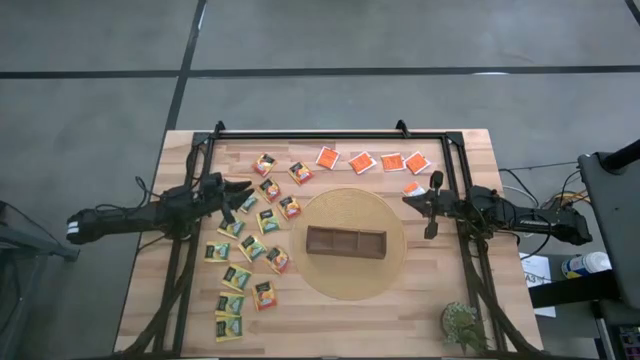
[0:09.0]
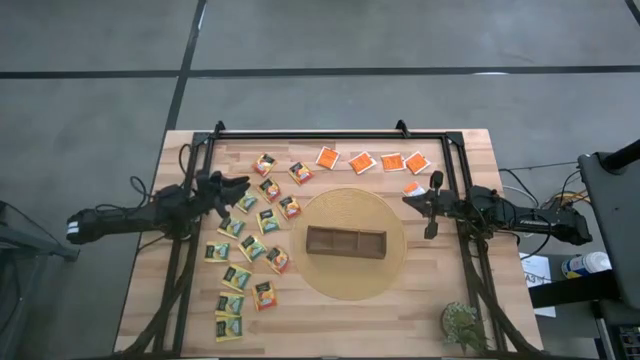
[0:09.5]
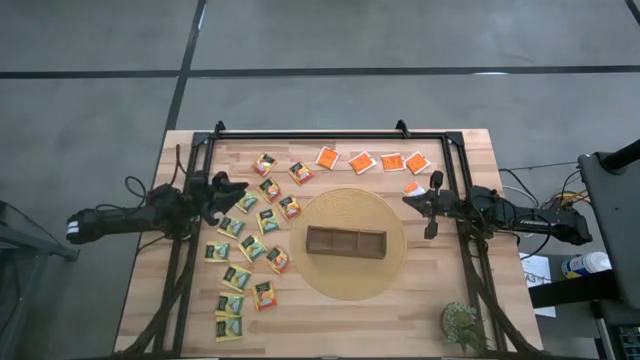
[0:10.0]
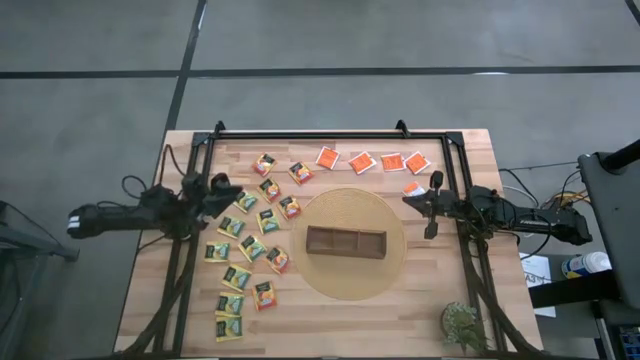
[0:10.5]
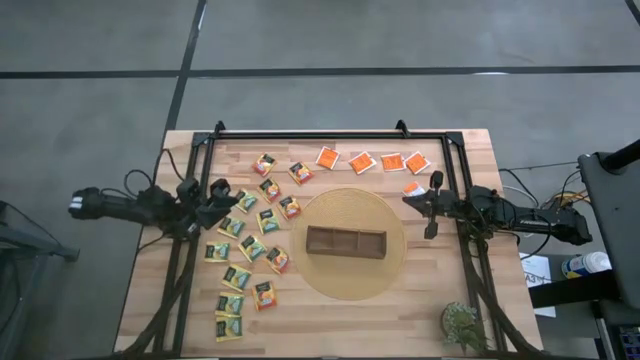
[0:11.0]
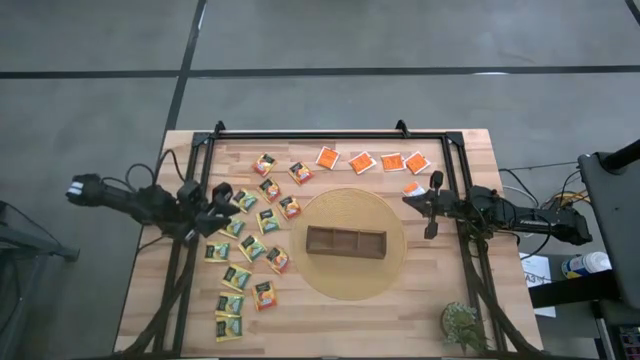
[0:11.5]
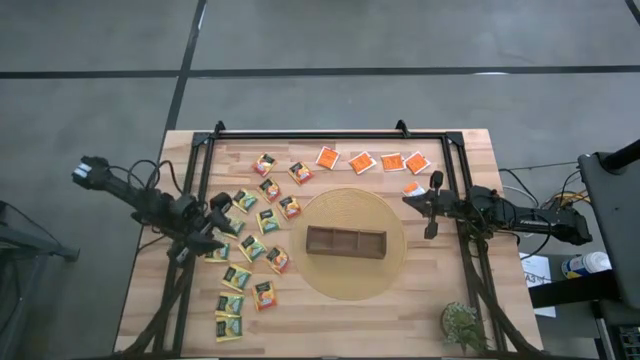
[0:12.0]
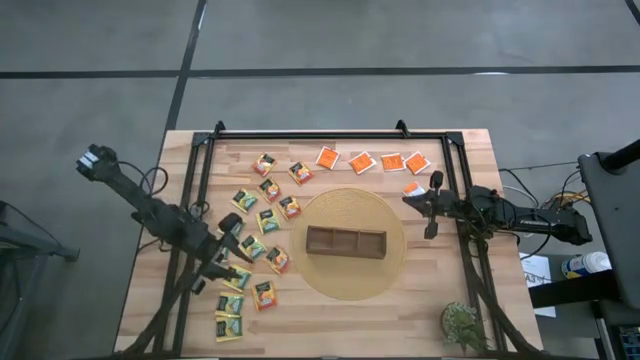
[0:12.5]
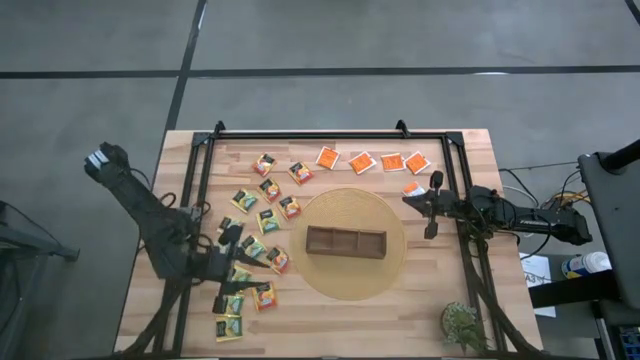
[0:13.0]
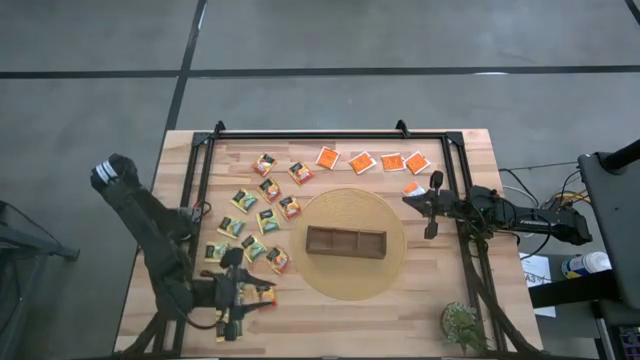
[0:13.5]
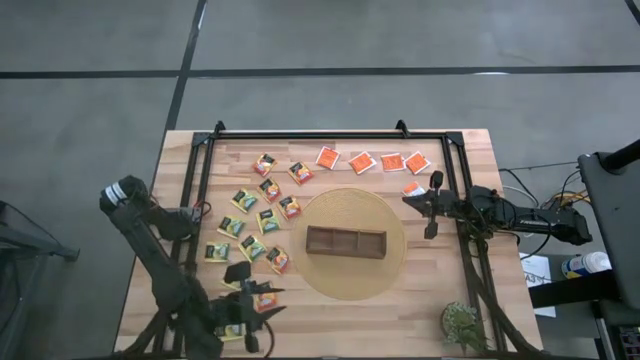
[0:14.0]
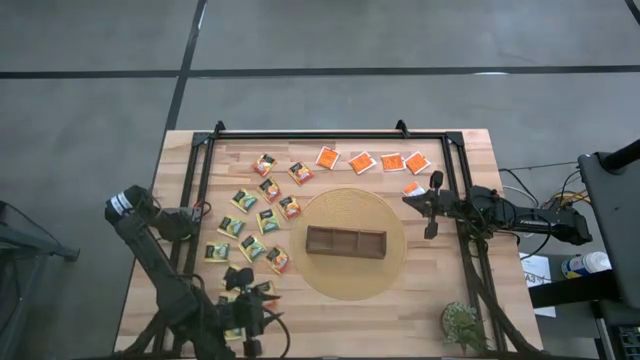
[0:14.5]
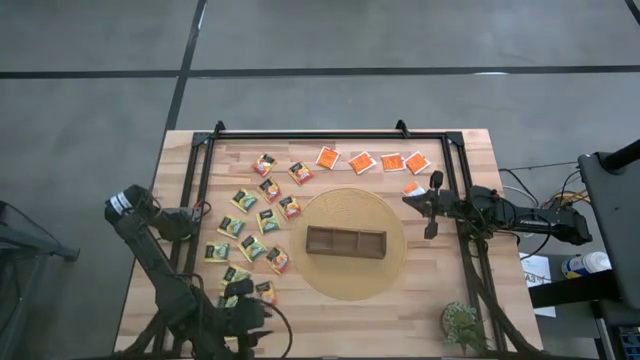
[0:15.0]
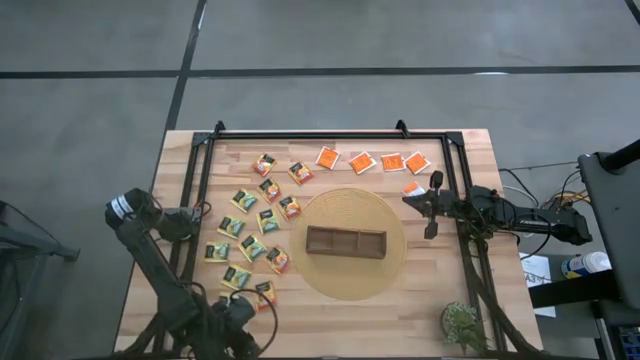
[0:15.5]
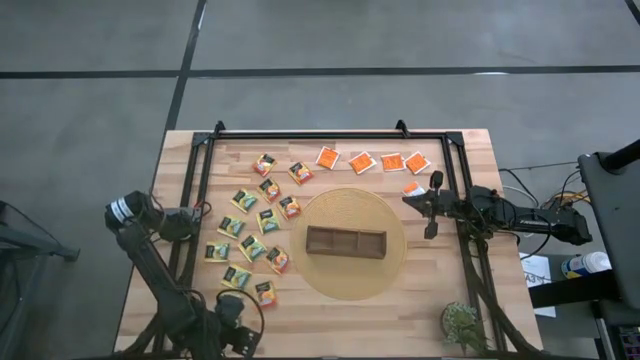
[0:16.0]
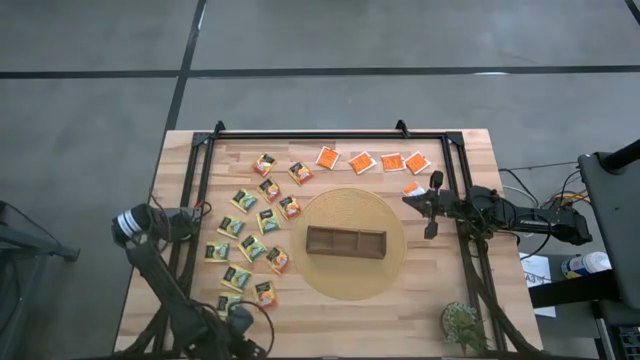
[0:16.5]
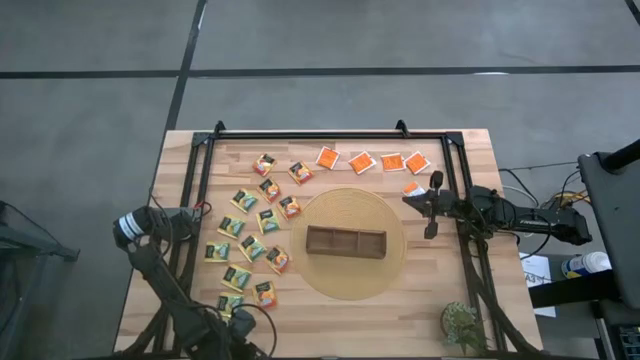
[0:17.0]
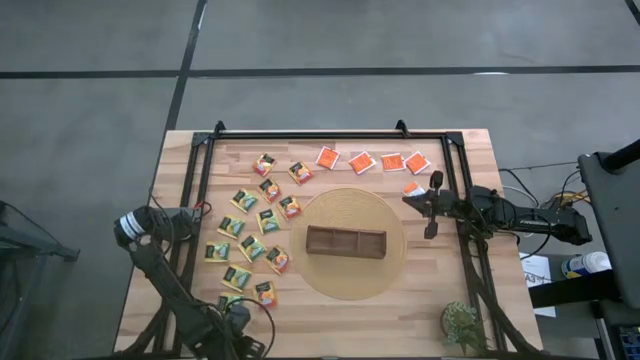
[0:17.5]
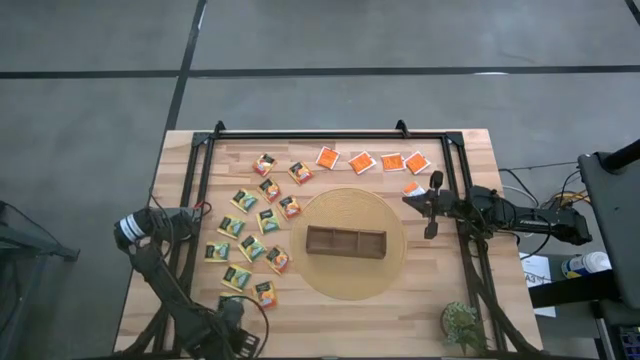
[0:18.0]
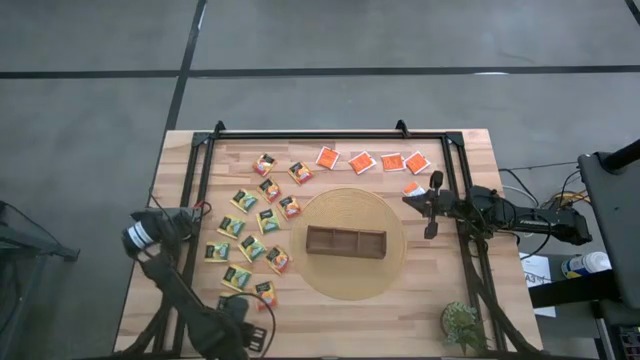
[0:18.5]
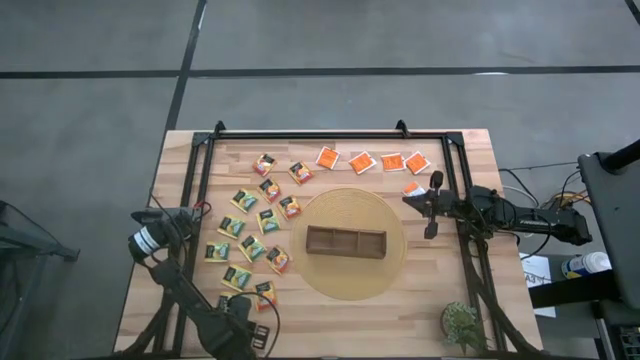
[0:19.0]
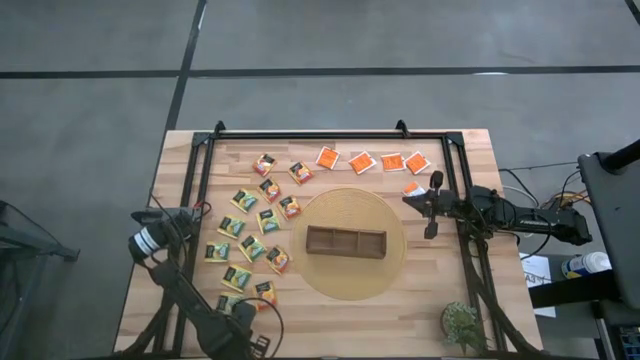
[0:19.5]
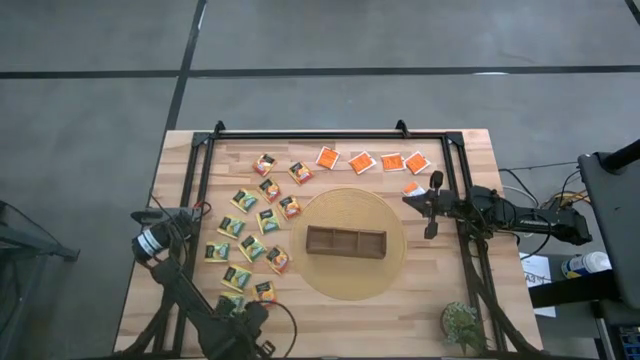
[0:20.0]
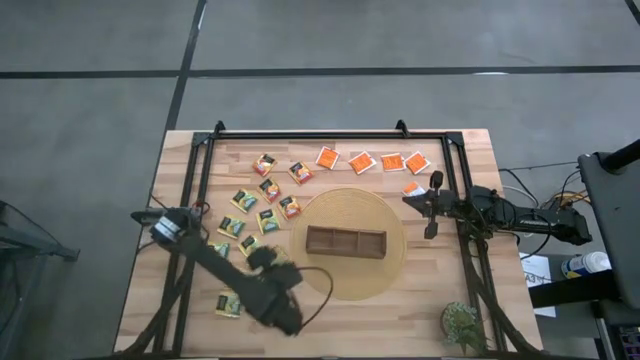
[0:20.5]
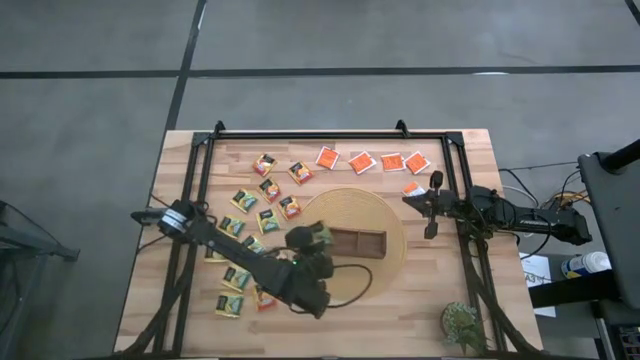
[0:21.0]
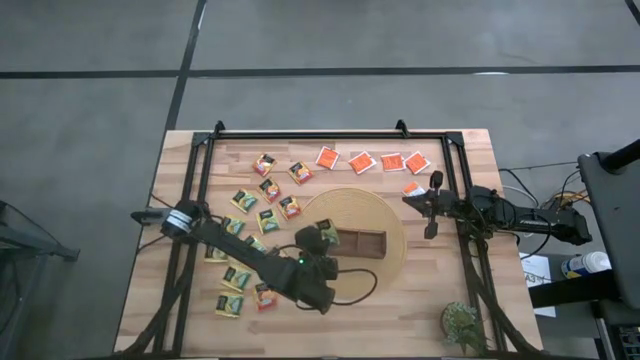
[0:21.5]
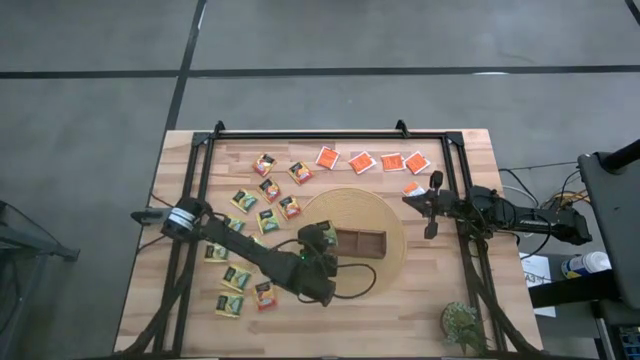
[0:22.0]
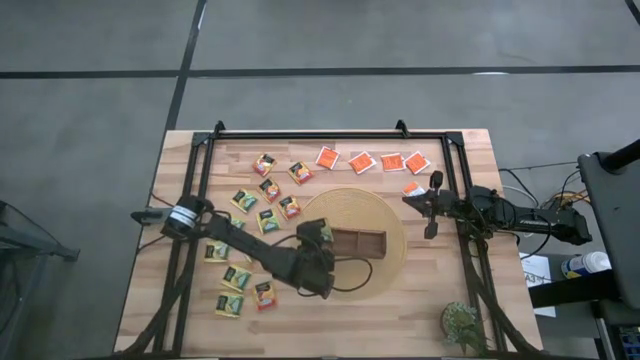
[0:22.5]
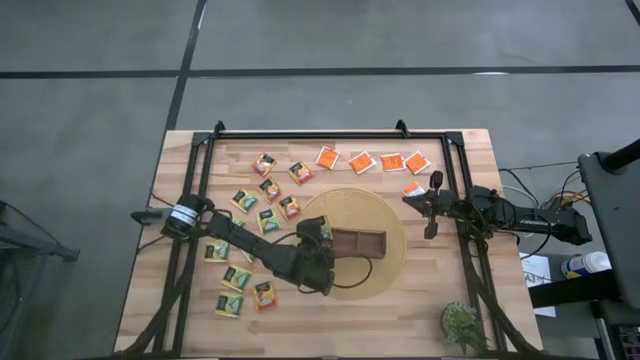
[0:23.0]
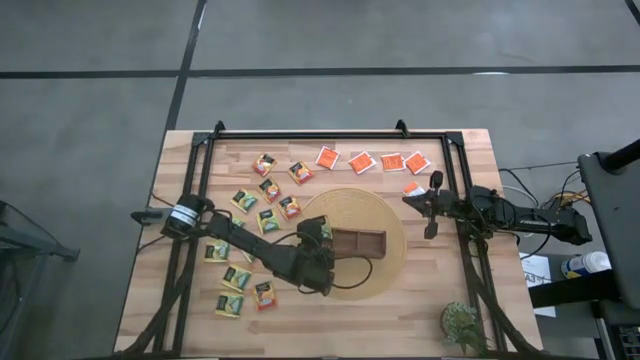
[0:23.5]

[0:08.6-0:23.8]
Task: Pick & Place Tea
Put the green tea bag into the left section of the wooden organizer

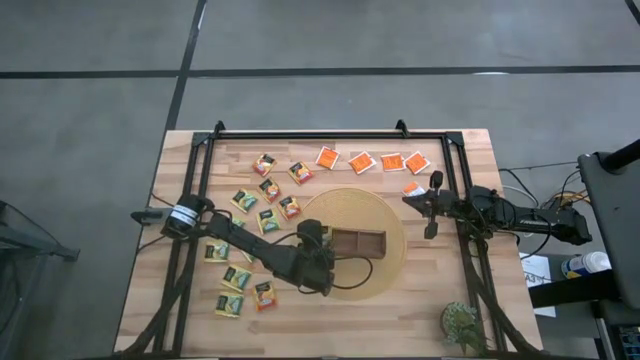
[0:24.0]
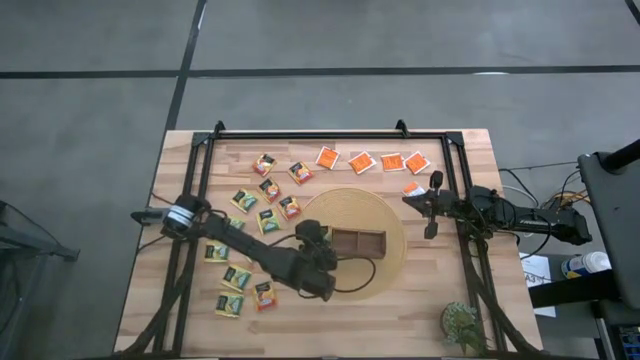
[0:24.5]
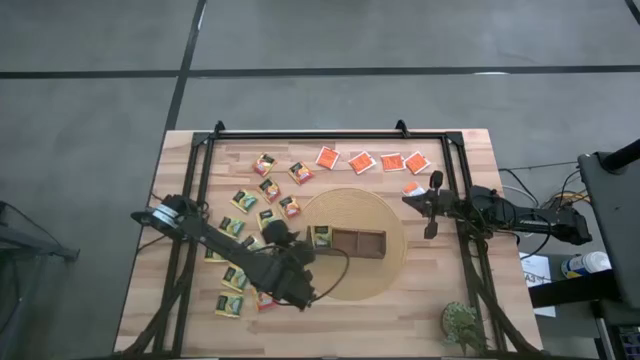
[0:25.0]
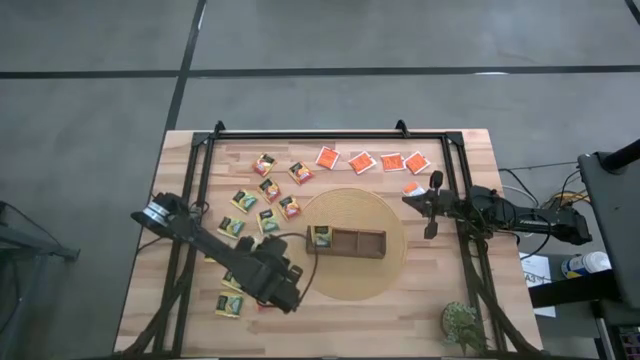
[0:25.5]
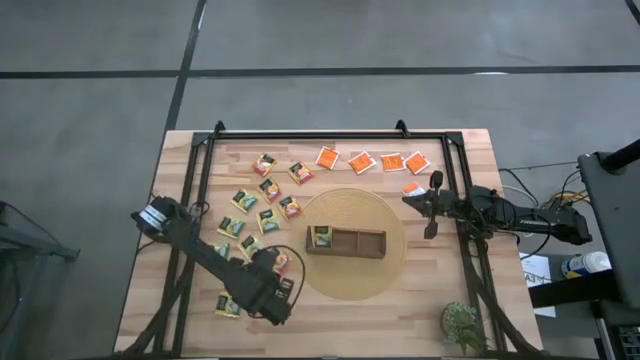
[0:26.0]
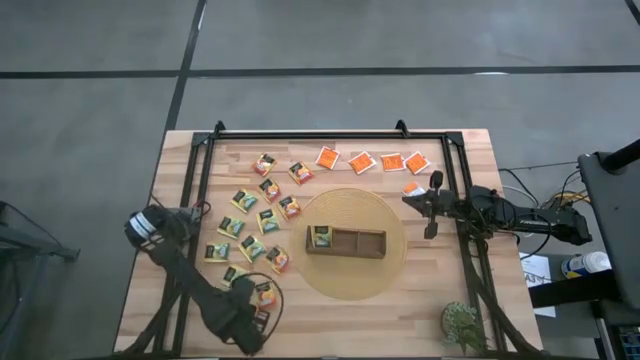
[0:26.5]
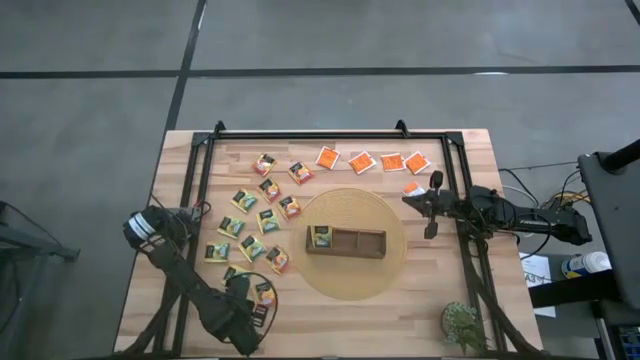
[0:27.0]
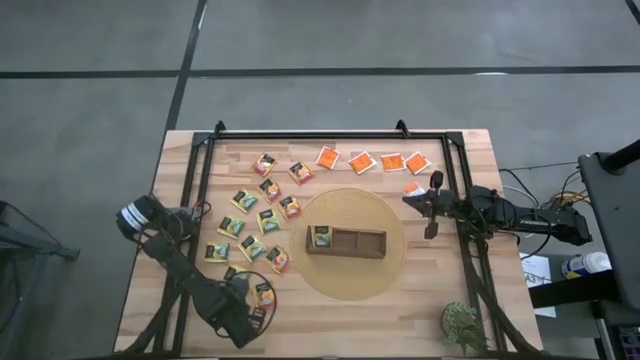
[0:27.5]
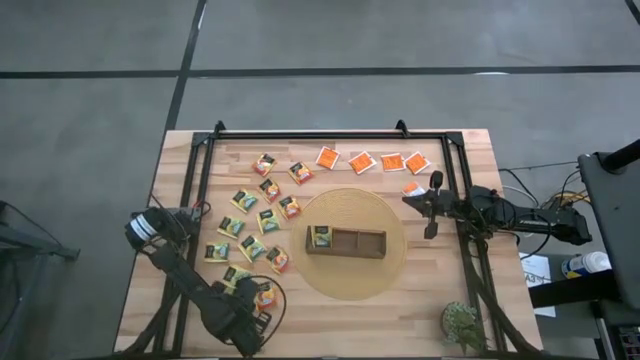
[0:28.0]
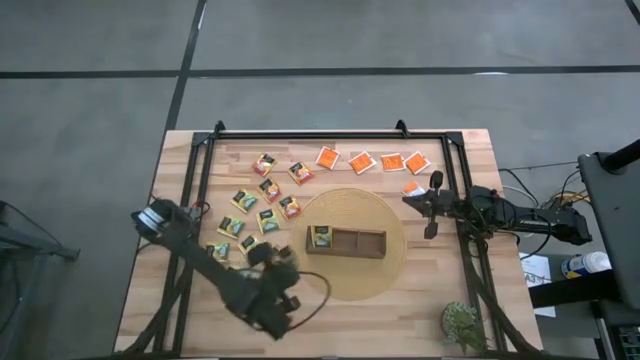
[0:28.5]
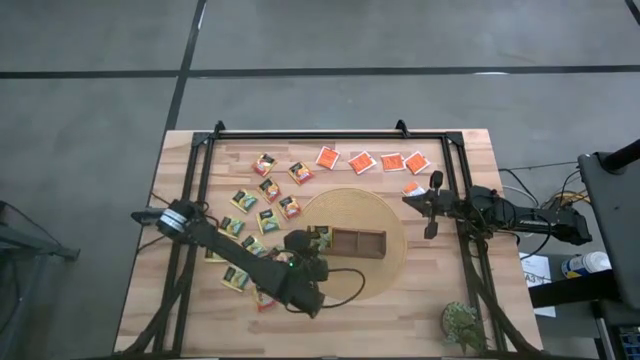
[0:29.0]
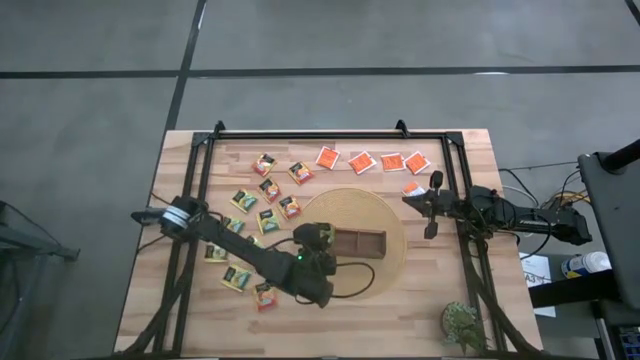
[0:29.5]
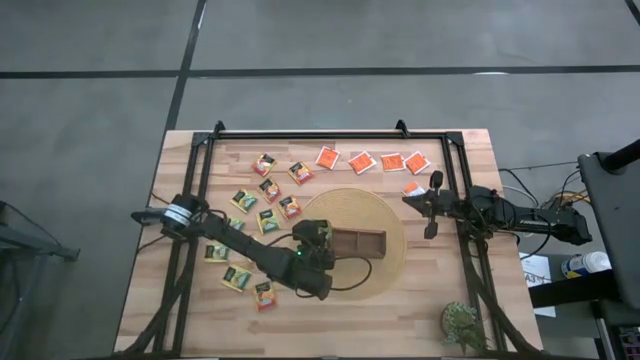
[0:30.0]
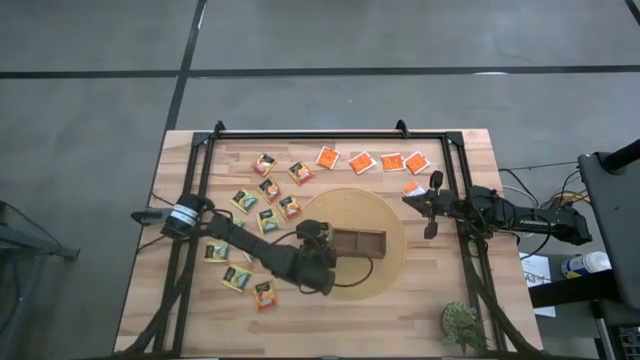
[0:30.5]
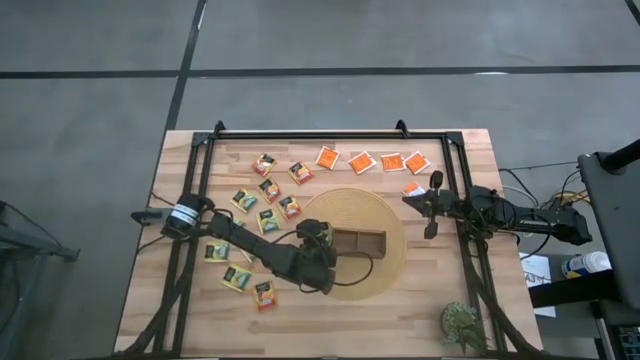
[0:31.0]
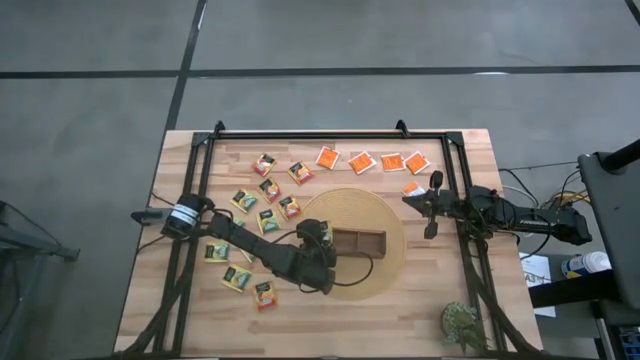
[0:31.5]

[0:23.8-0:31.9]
Put the green tea bag into the left section of the wooden organizer
